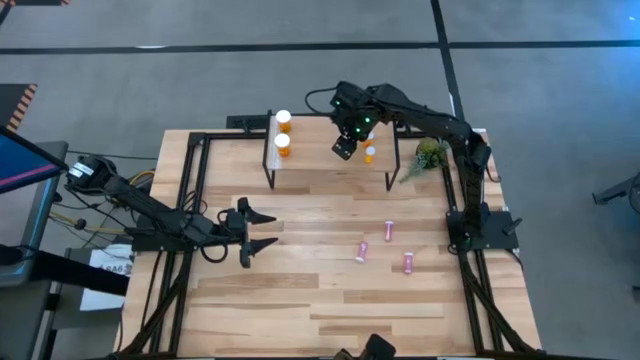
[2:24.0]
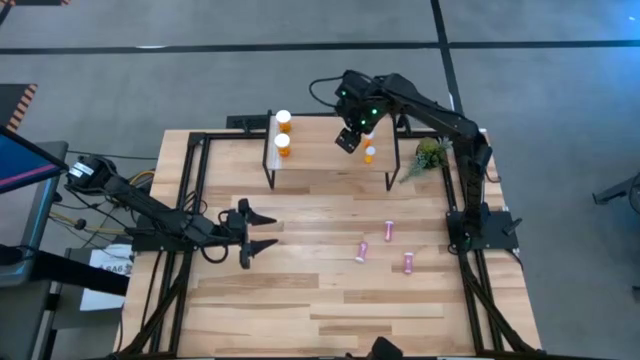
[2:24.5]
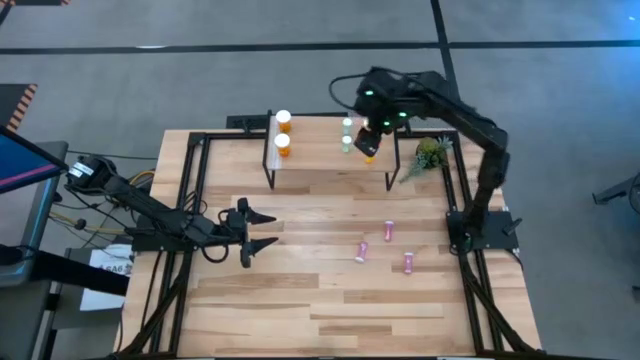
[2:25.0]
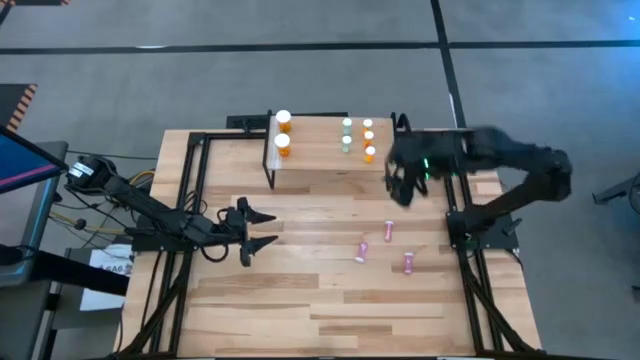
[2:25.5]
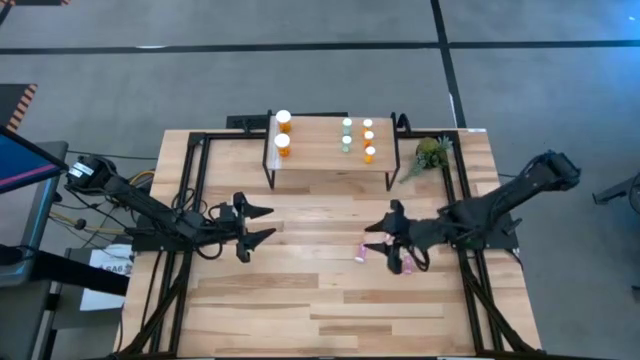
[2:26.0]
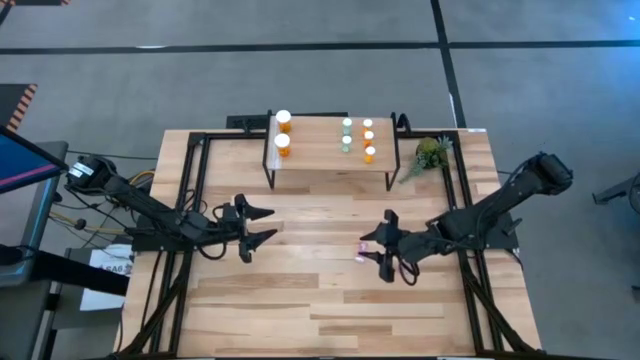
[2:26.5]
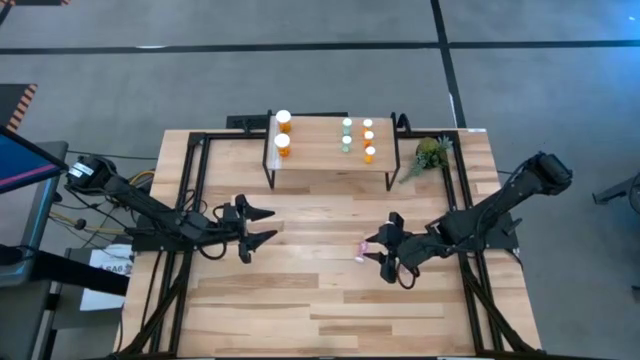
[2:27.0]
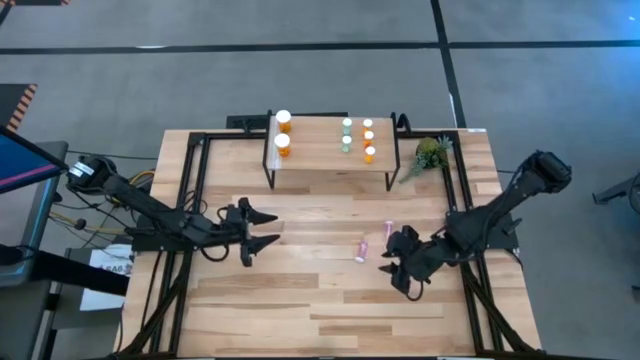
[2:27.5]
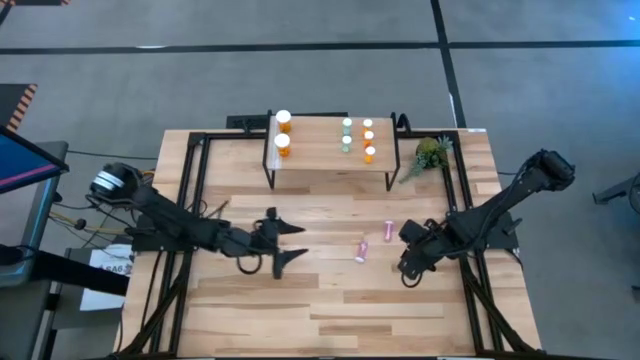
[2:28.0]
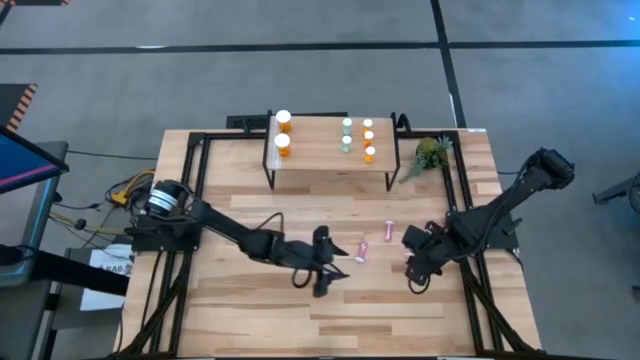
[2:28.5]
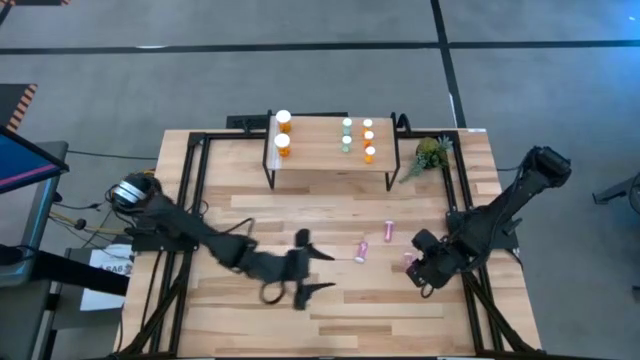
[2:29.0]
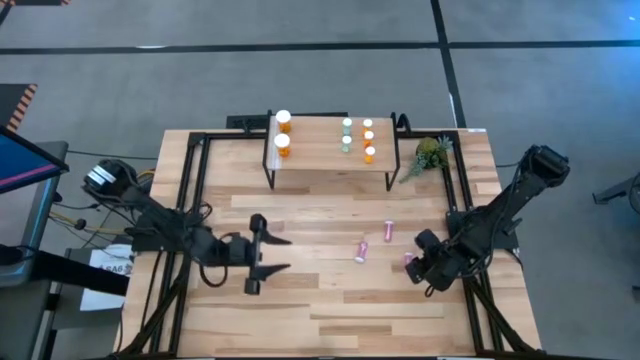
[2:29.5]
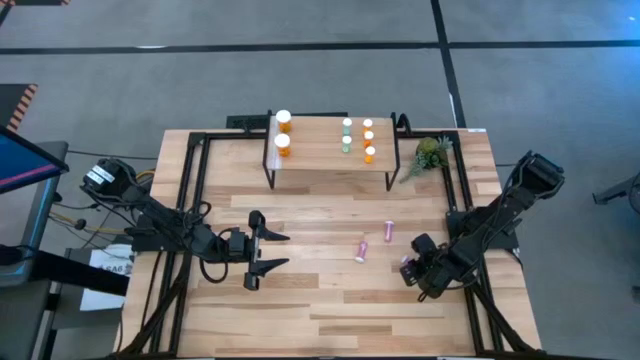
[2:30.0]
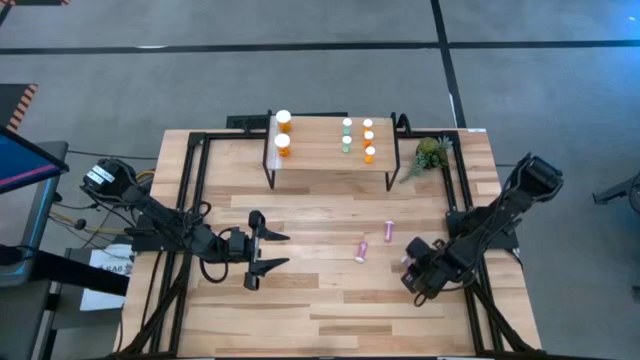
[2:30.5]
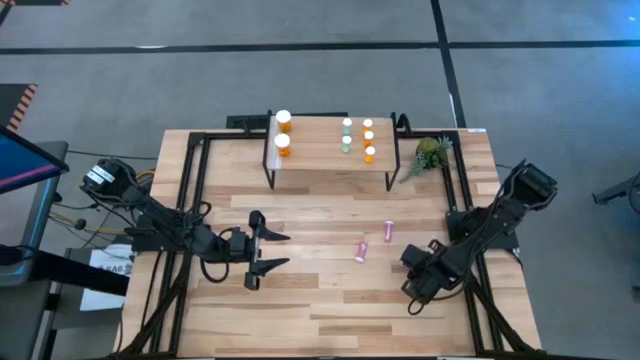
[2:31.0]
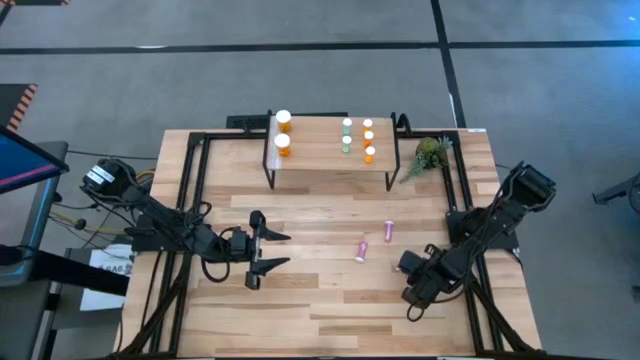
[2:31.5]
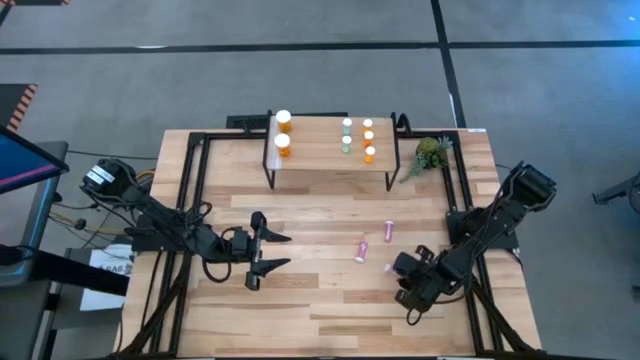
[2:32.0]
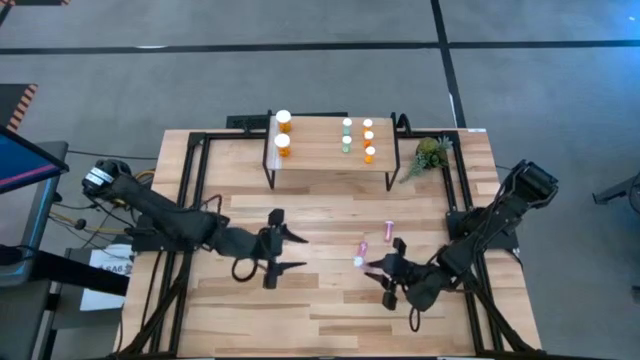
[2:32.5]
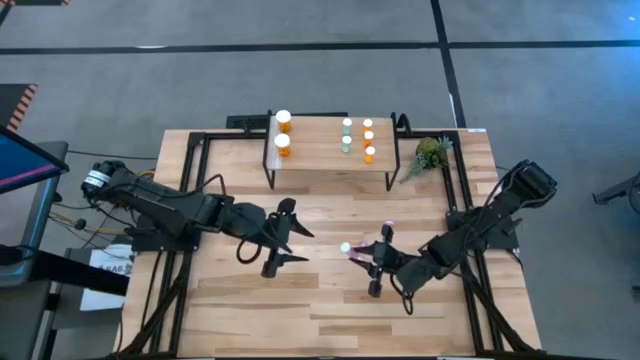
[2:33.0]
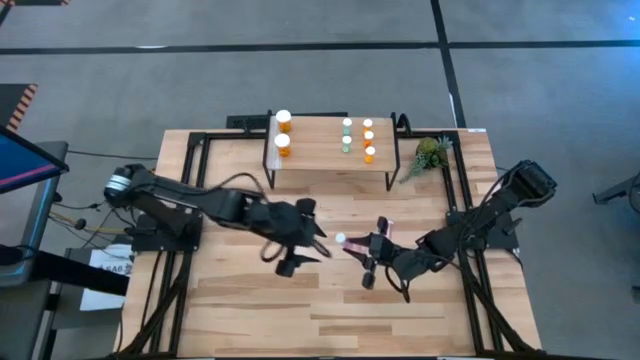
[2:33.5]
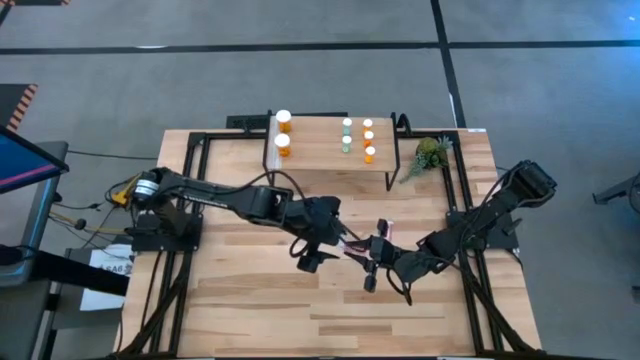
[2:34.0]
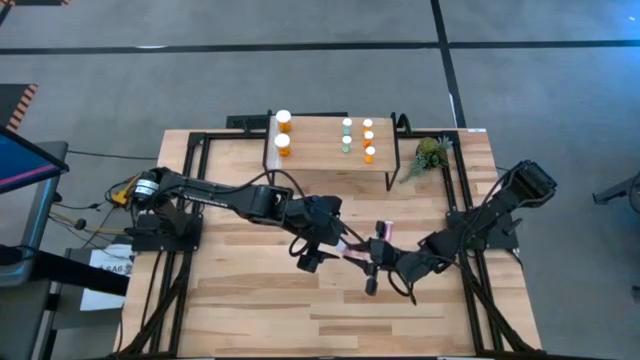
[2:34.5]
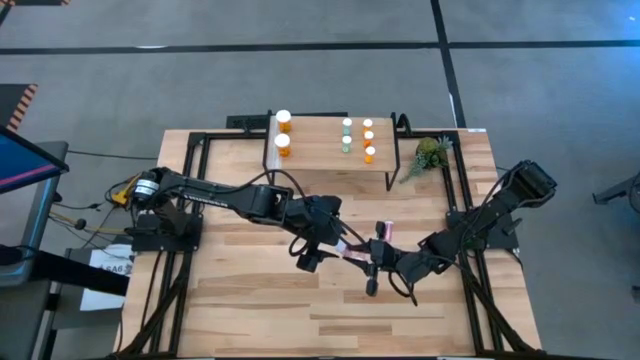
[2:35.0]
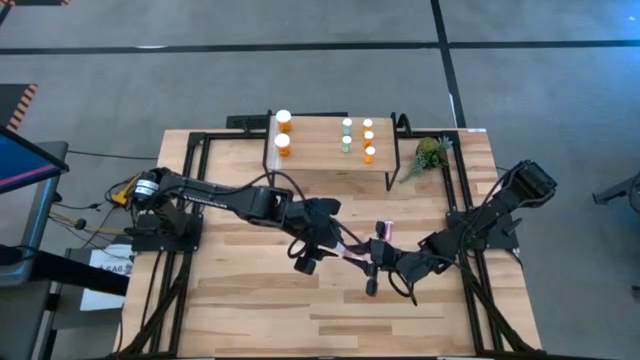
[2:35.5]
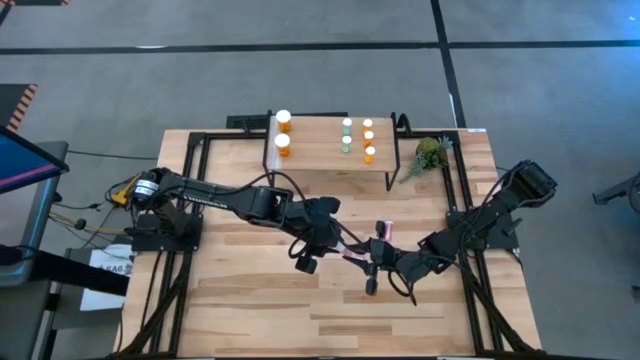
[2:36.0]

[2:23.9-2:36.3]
Task: Pick and place medicine bottles onto shelf by color
Put the bottom right pink pill bottle on the shelf

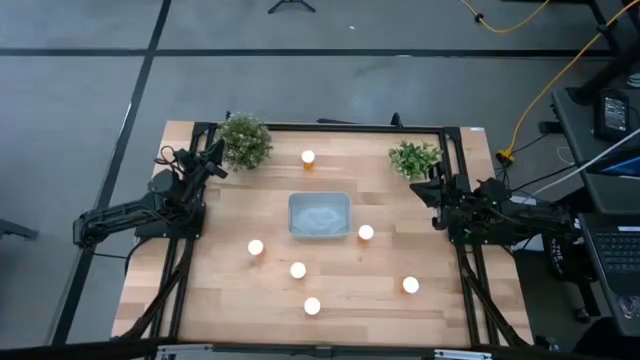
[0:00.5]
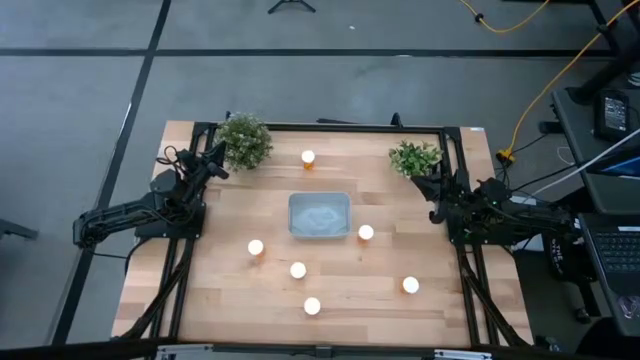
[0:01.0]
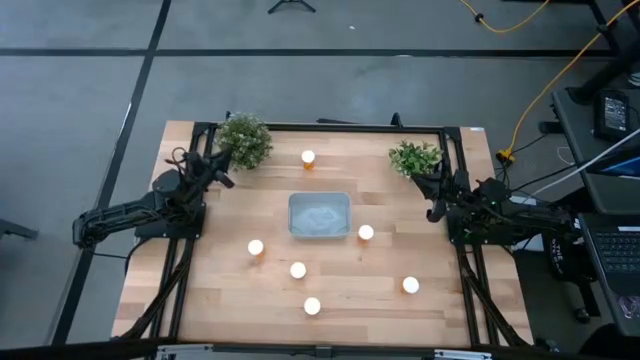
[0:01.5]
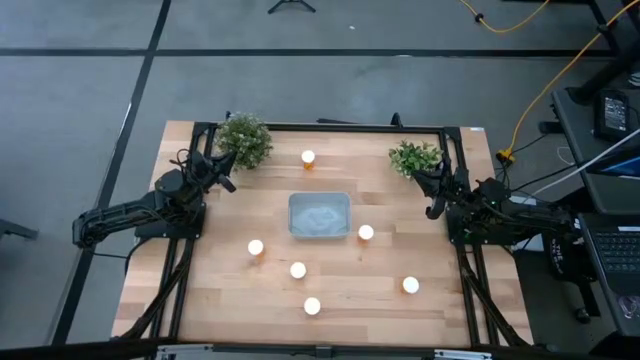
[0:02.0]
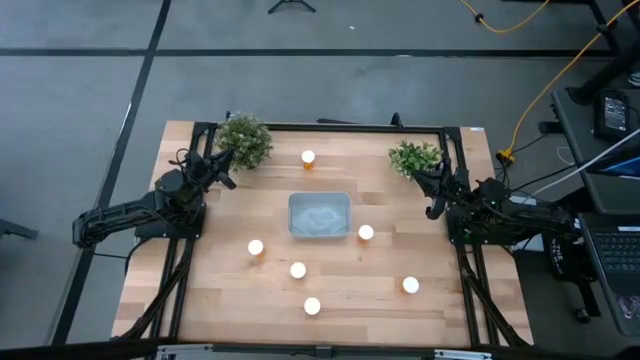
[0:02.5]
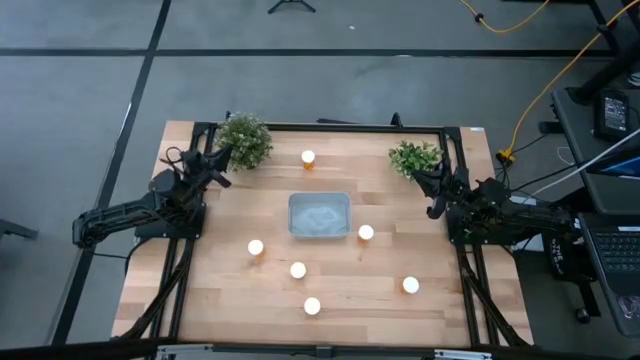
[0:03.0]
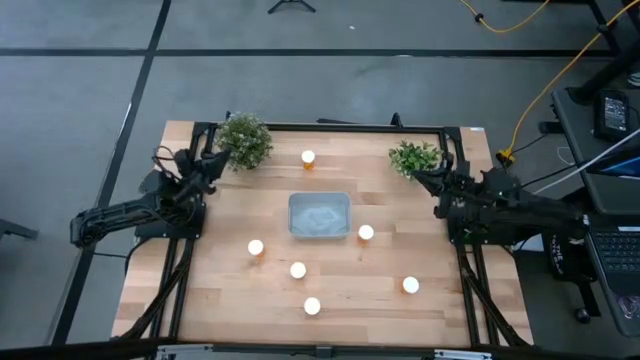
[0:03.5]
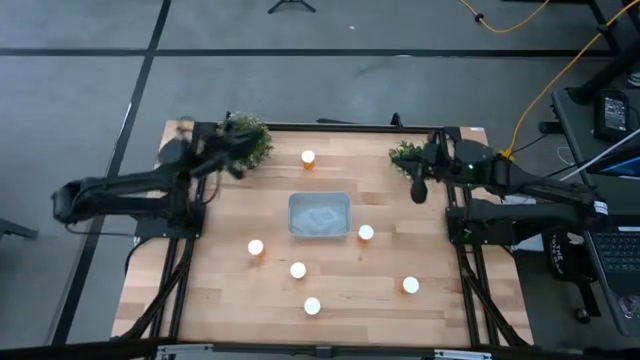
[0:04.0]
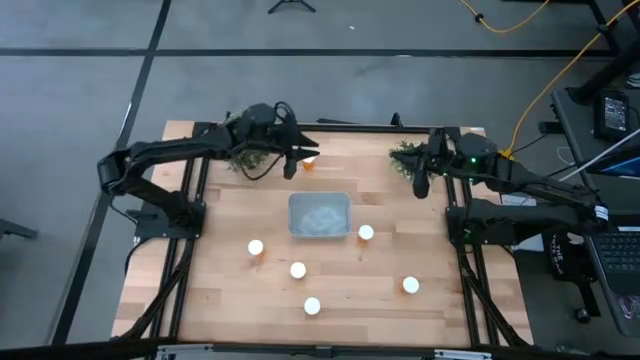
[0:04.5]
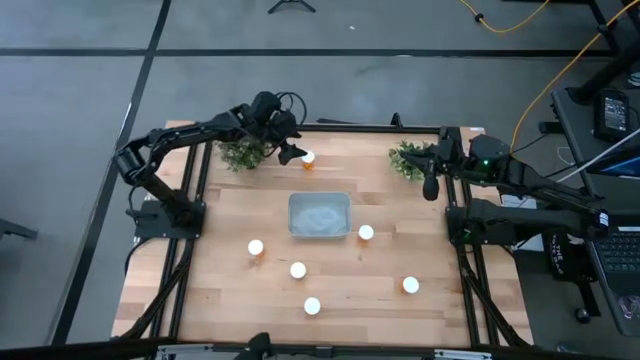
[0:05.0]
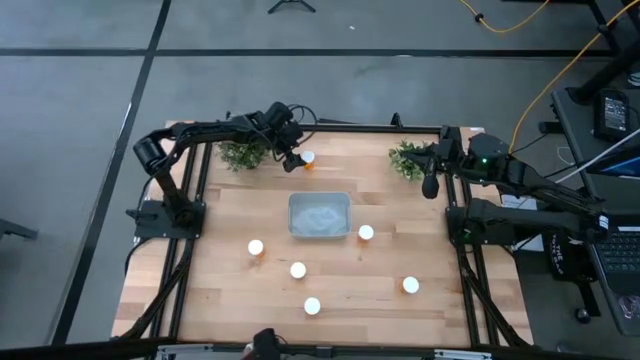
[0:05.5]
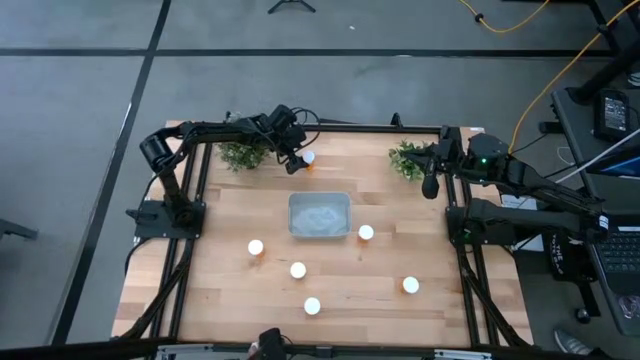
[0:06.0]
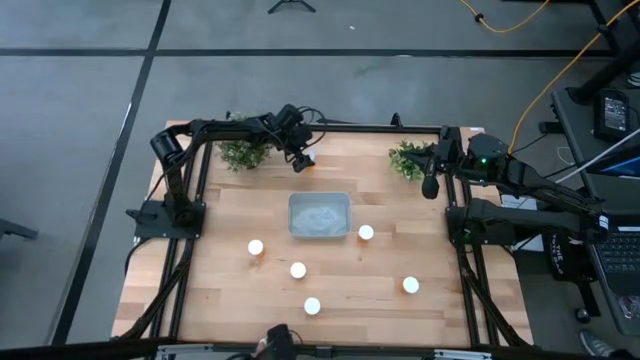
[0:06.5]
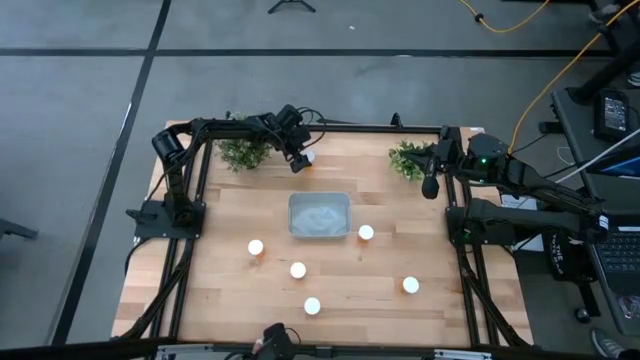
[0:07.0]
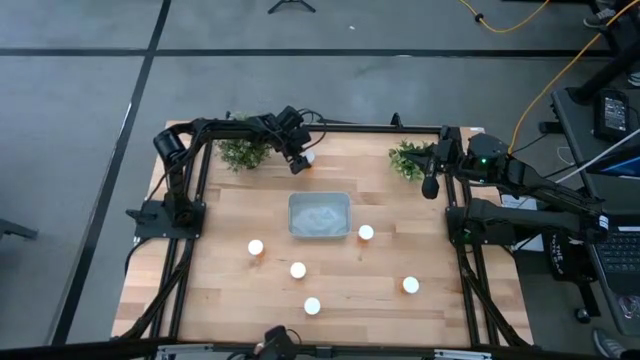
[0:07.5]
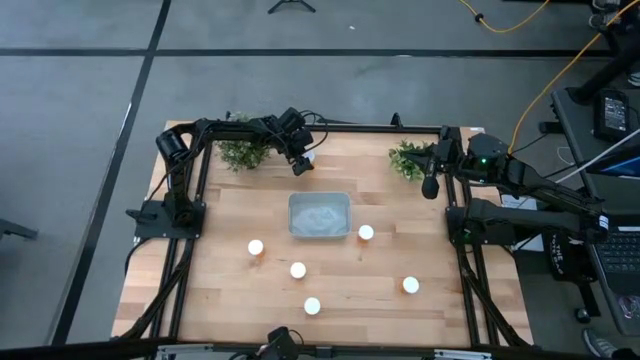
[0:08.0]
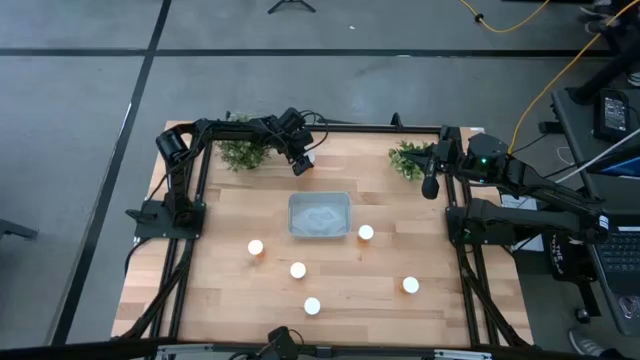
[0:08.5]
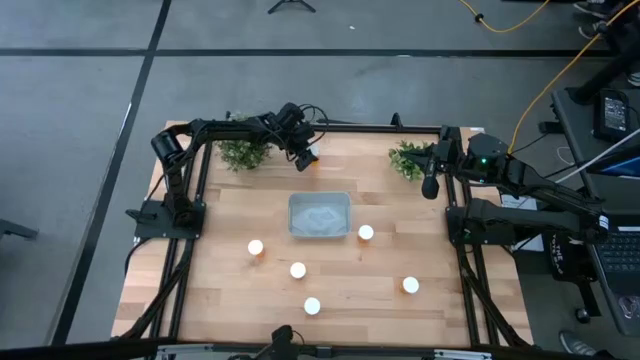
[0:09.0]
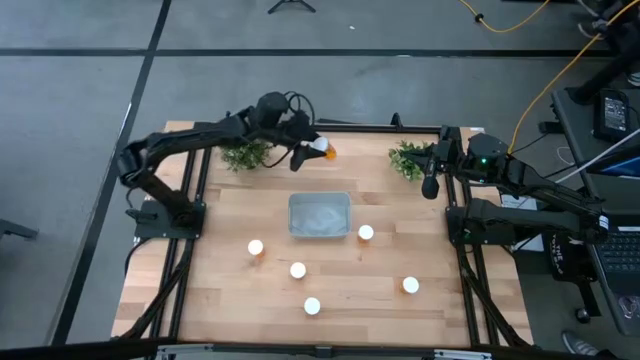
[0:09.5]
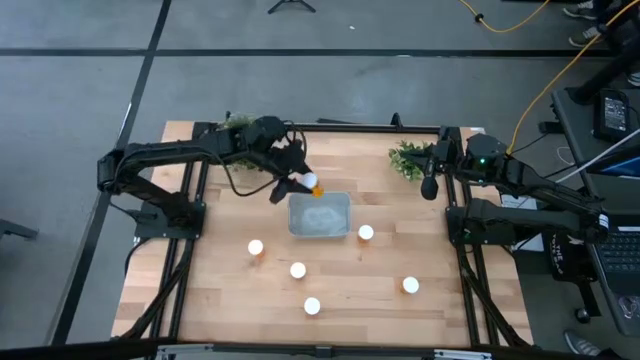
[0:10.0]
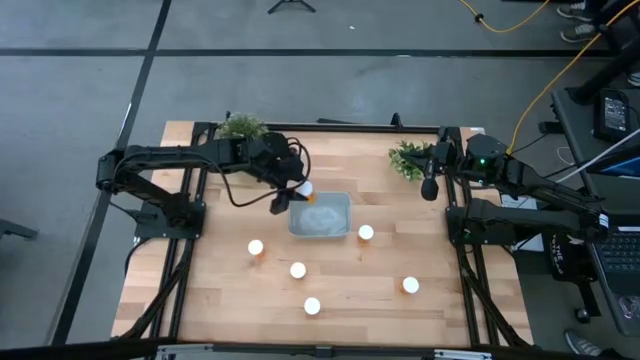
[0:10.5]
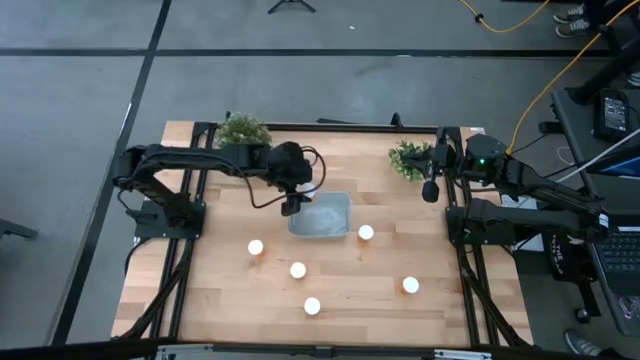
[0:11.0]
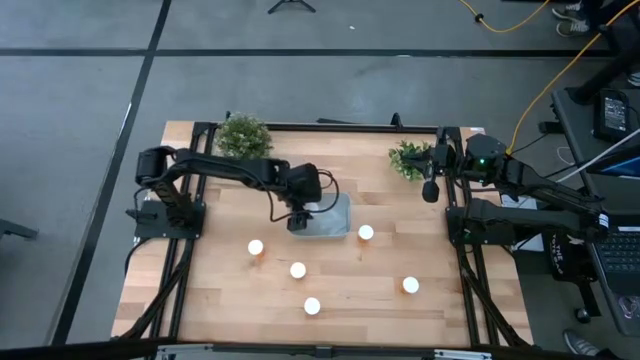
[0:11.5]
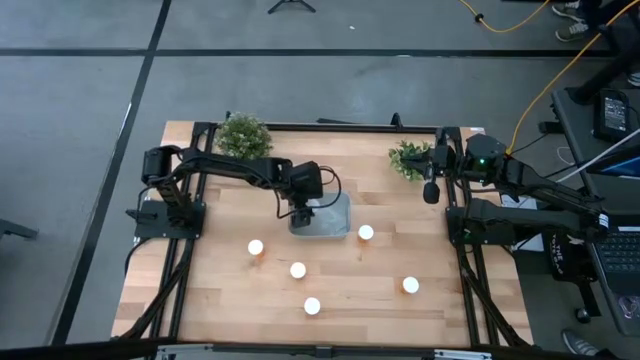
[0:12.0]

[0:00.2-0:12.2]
Task: Pick and place pill bottles into a basket
Put the orange pill bottle into the gray bin
